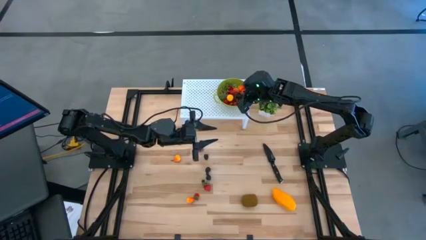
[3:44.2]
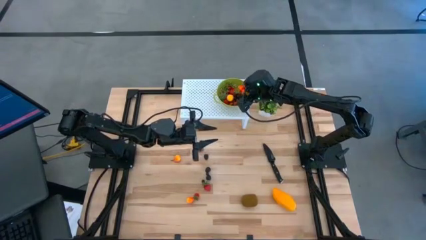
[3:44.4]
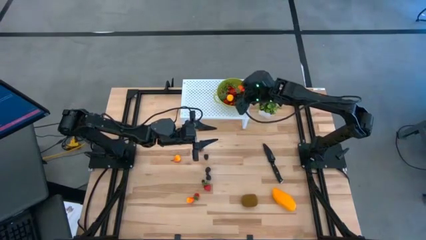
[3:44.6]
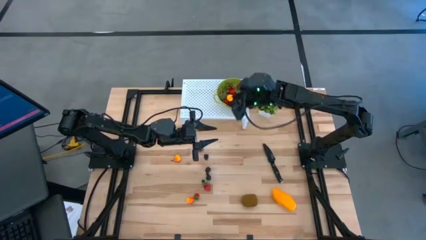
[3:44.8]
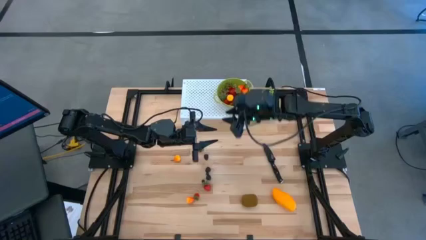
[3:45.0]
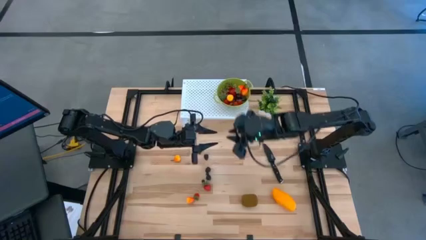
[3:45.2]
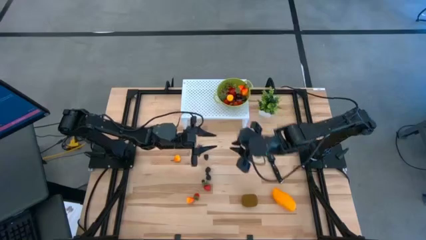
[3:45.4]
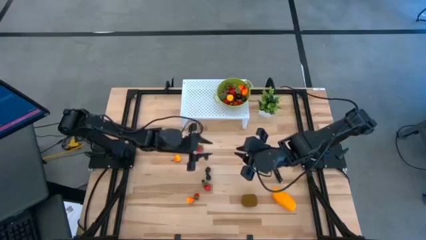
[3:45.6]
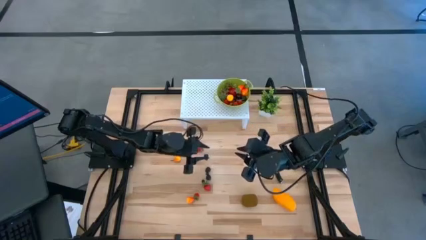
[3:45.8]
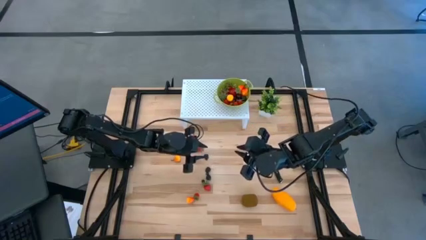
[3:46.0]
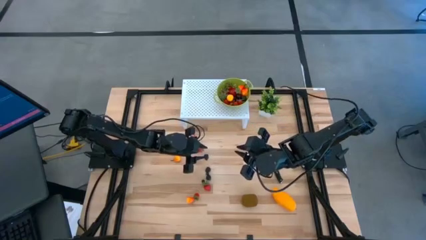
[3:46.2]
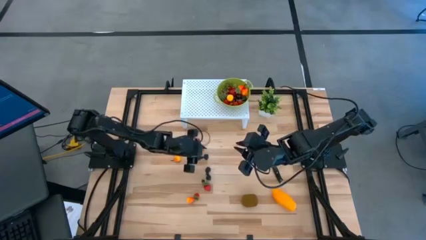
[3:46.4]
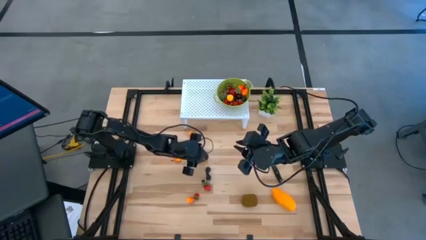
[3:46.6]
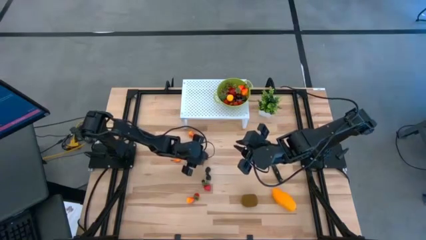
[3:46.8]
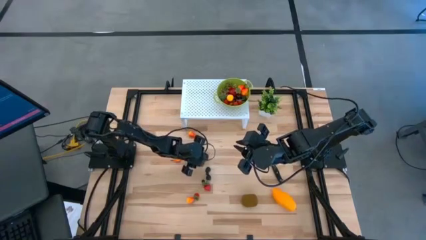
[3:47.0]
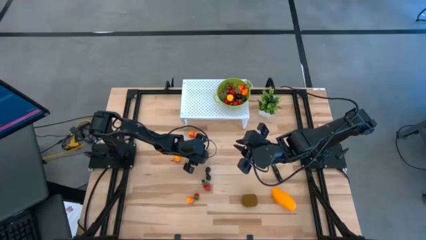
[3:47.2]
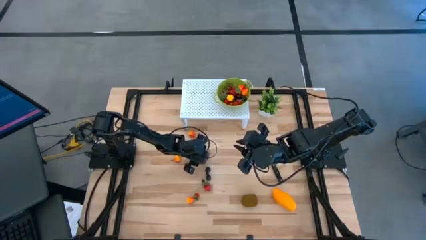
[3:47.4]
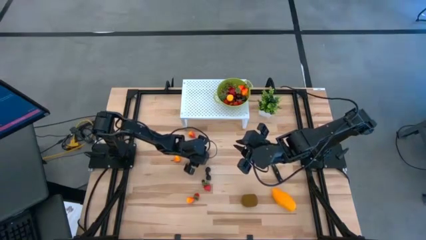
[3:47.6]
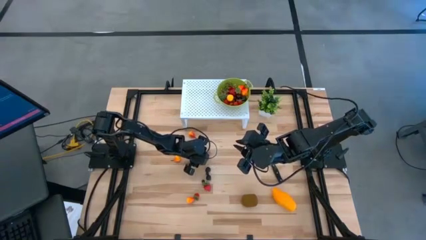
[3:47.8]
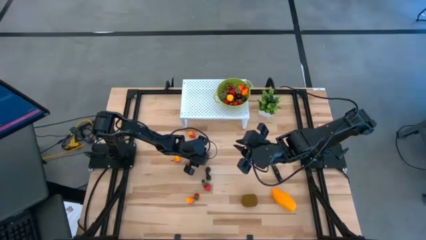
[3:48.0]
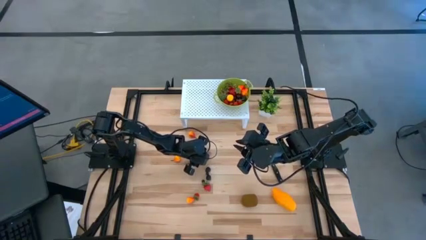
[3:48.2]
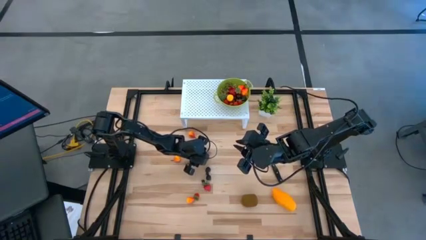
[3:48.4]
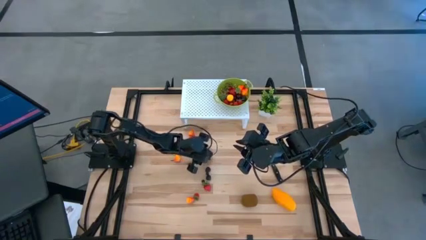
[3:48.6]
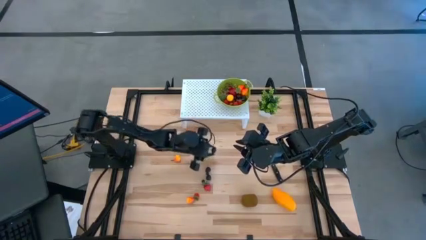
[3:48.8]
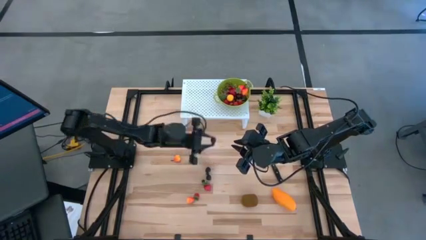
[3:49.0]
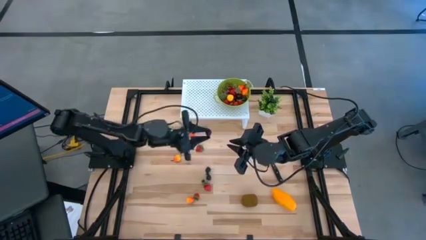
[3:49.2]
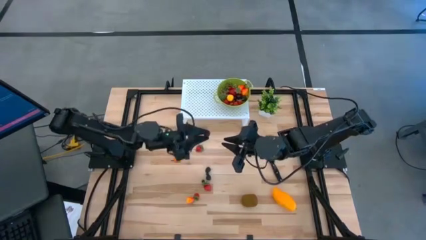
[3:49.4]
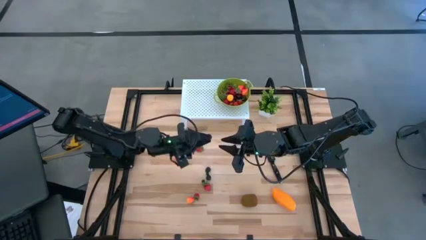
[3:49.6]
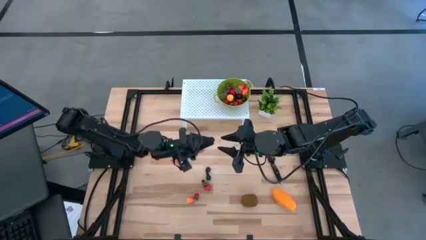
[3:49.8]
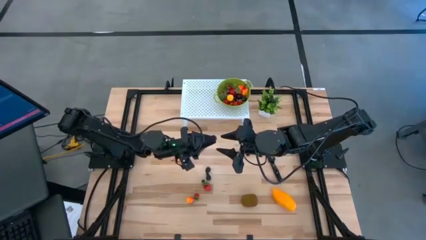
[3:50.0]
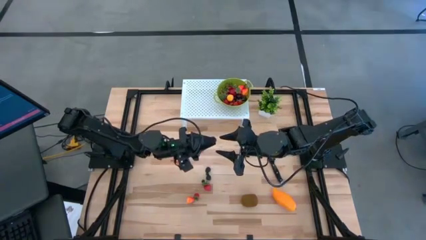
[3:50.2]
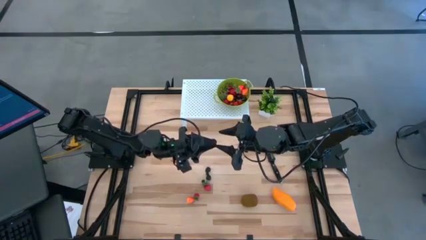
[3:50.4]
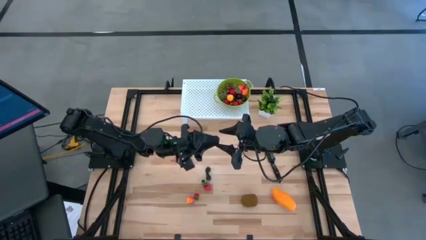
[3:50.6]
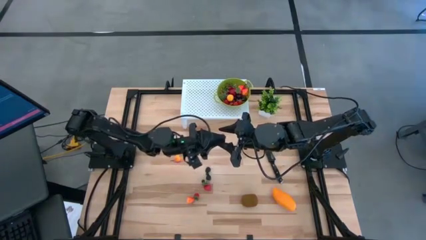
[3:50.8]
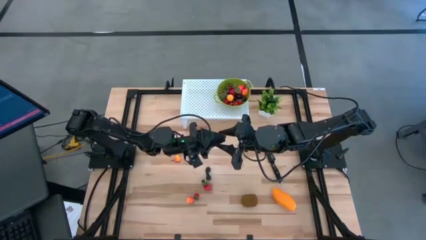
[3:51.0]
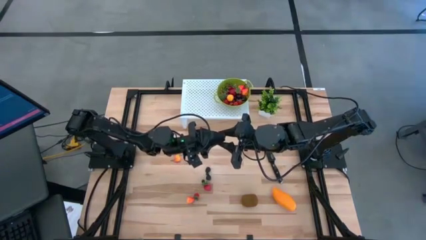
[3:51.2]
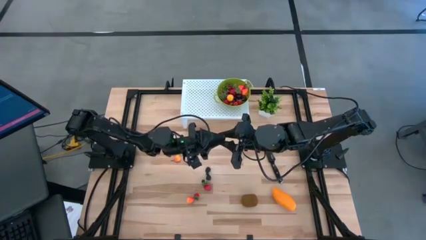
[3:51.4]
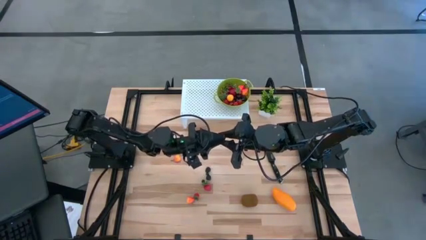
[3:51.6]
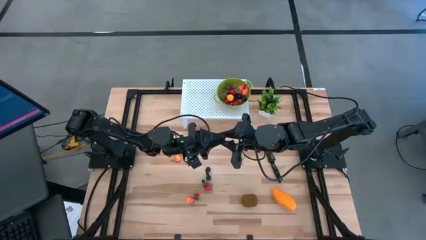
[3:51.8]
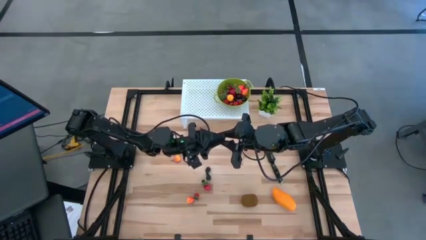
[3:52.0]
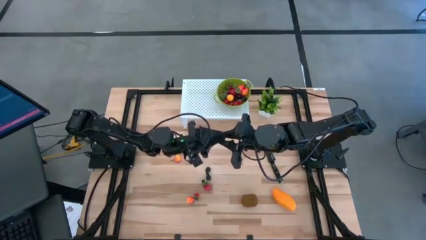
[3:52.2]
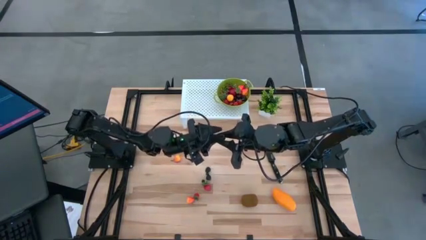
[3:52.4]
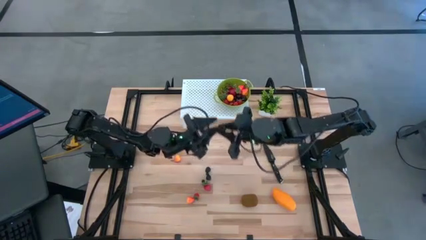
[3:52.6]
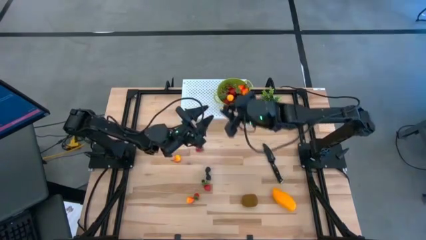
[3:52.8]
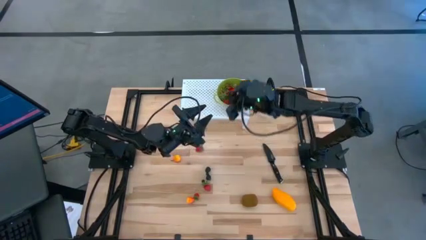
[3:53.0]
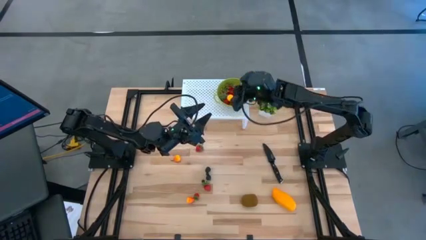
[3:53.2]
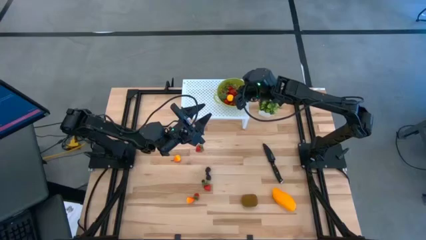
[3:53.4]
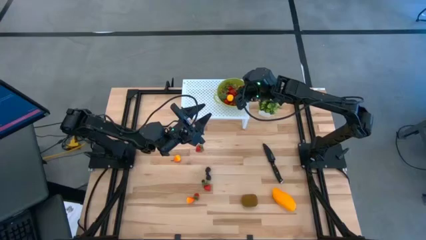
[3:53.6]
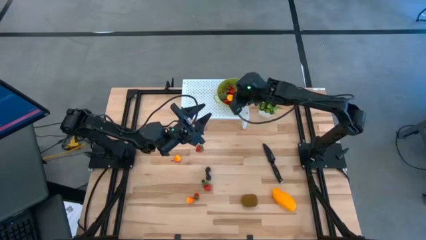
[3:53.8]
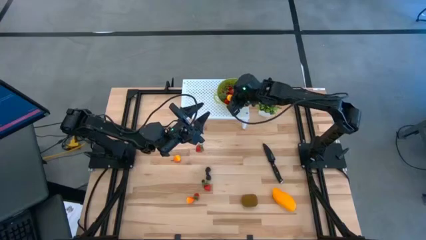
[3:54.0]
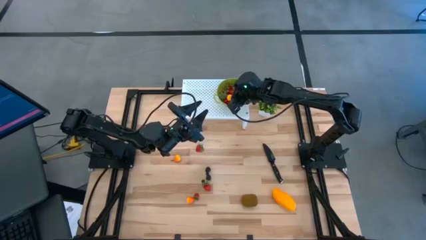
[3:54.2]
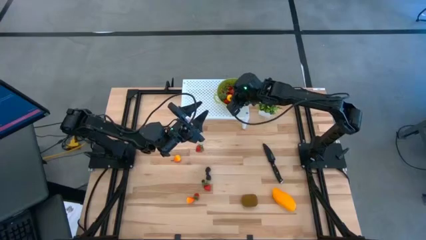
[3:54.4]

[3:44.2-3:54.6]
Task: Pick & Place Fruit
Put the black raspberry into the green strainer bowl

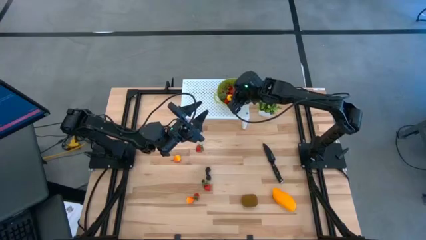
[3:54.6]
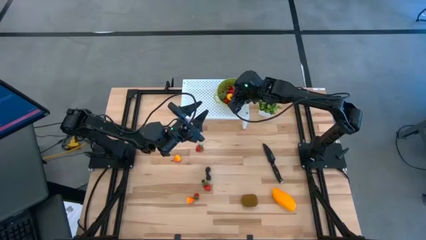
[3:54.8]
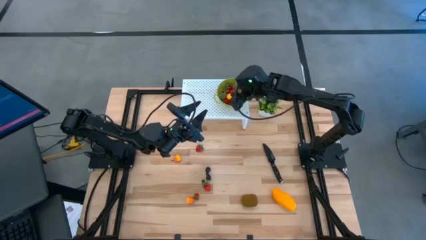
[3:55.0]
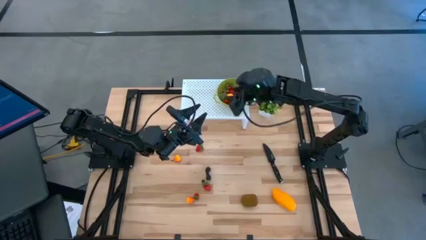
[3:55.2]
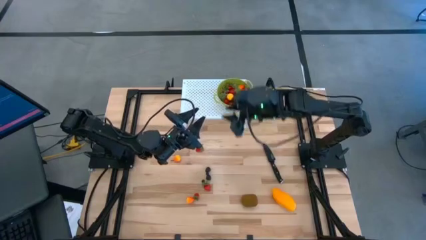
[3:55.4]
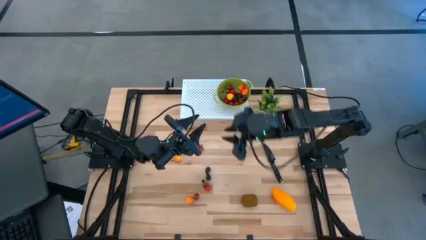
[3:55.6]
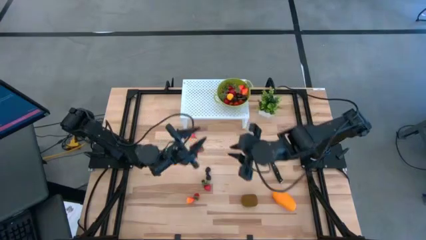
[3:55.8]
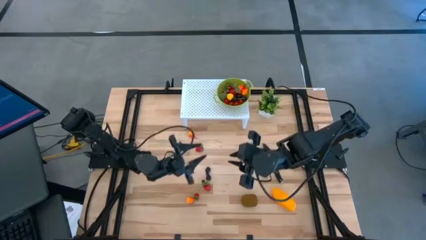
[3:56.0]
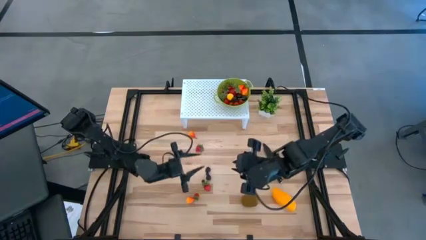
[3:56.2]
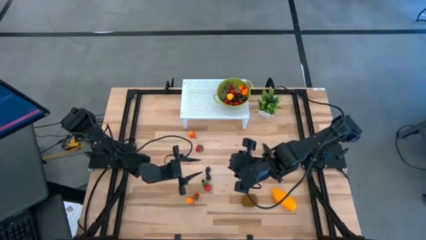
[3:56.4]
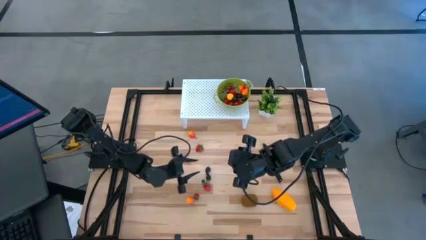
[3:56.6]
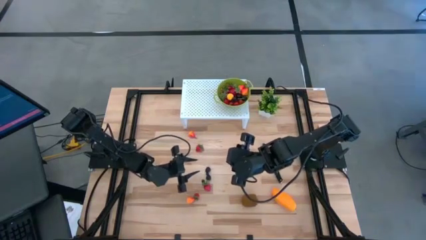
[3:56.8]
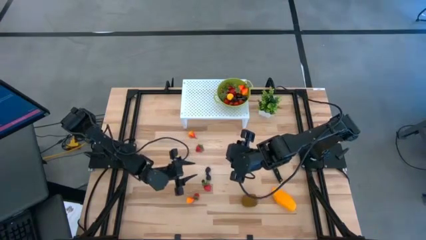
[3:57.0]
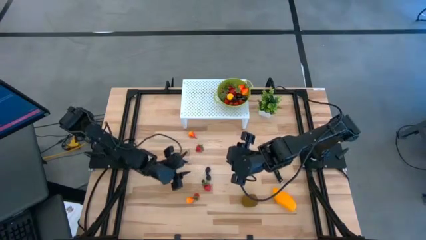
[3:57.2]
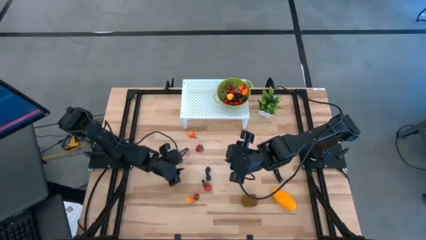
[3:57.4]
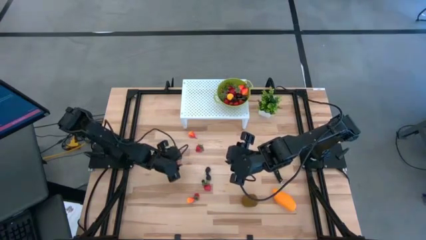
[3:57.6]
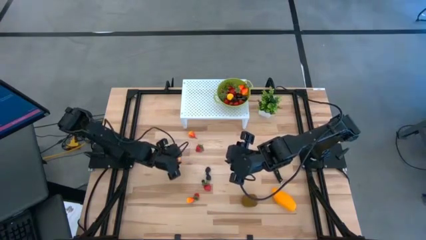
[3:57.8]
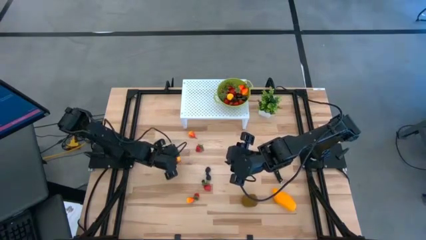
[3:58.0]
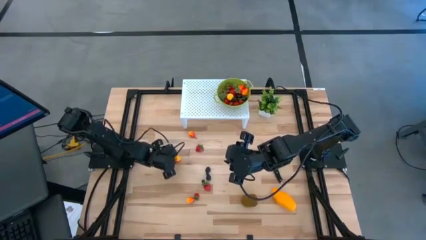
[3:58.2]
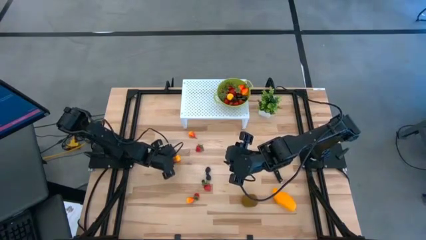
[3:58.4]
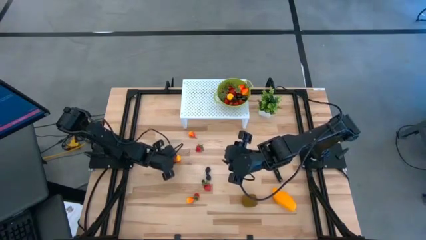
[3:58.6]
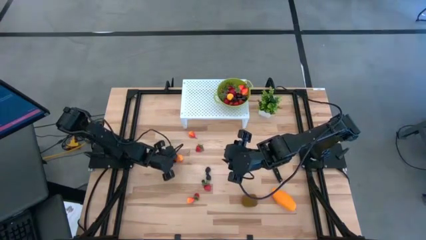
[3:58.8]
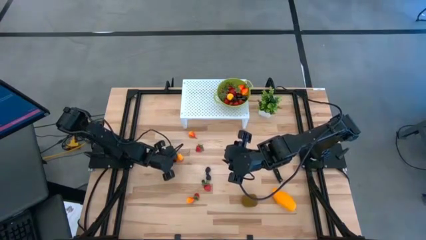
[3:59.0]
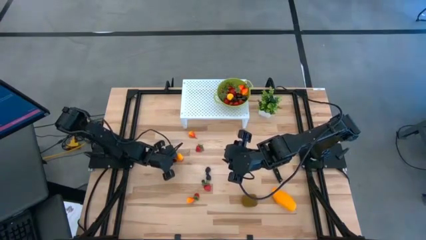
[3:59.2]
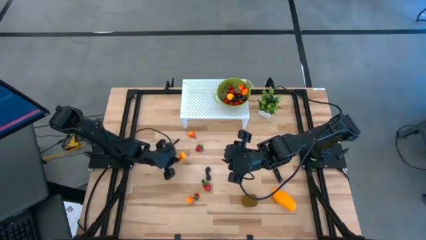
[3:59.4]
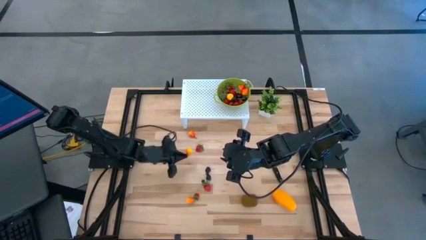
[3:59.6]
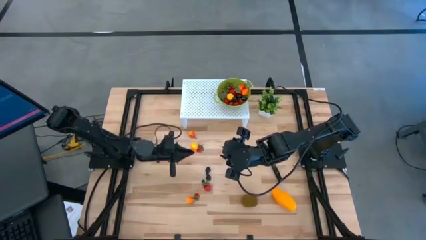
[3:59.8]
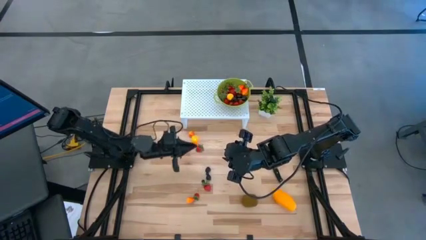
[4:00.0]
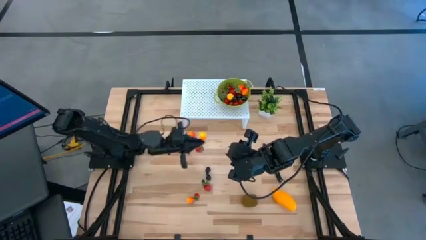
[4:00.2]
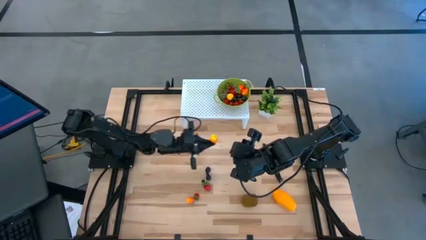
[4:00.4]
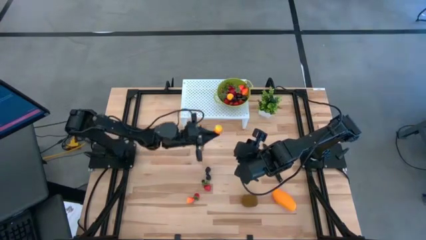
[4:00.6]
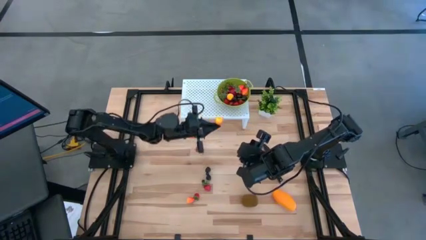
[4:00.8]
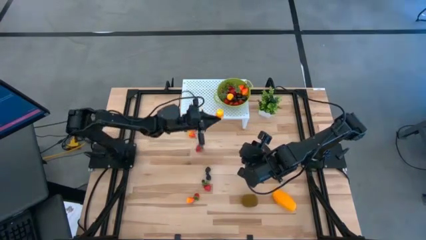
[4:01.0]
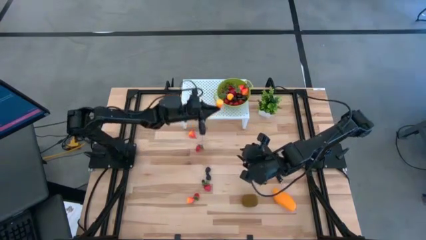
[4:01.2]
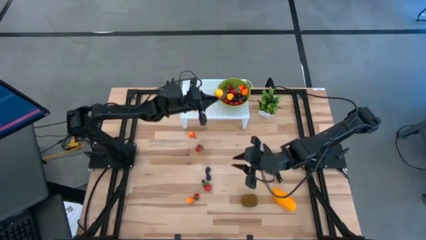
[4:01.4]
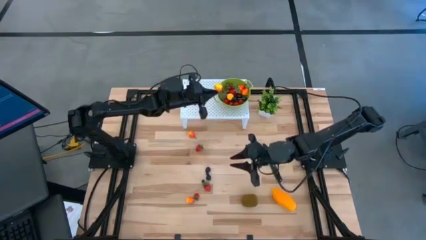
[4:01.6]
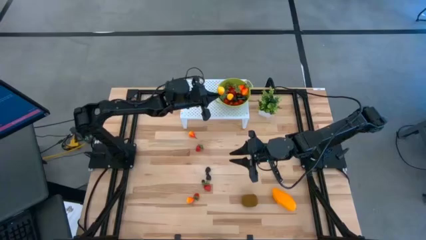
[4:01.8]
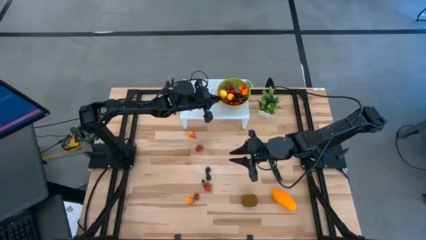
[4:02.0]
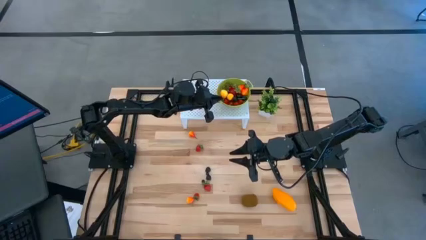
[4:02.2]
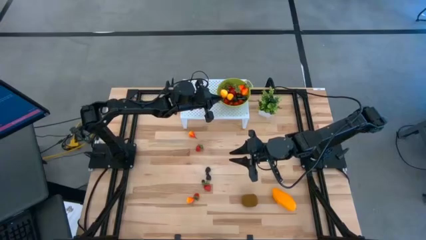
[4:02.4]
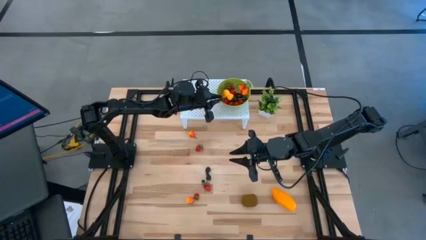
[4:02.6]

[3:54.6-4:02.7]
Put the yellow pear into the green strainer bowl
